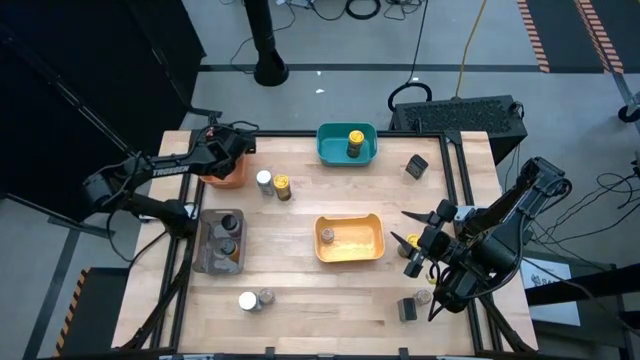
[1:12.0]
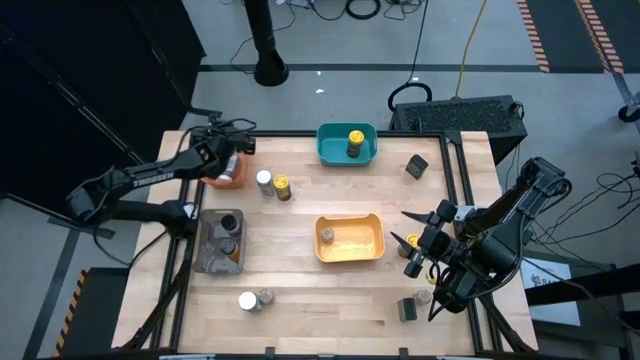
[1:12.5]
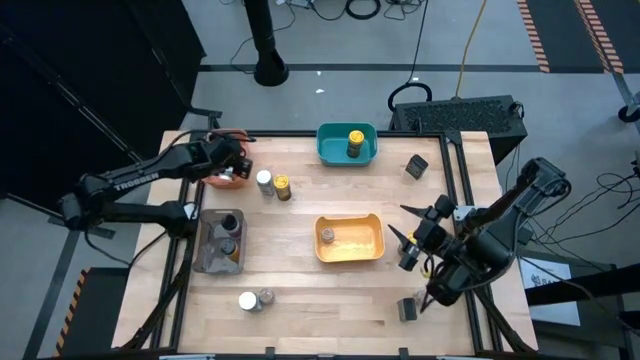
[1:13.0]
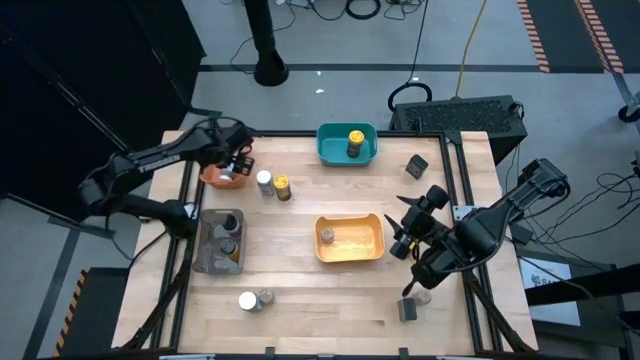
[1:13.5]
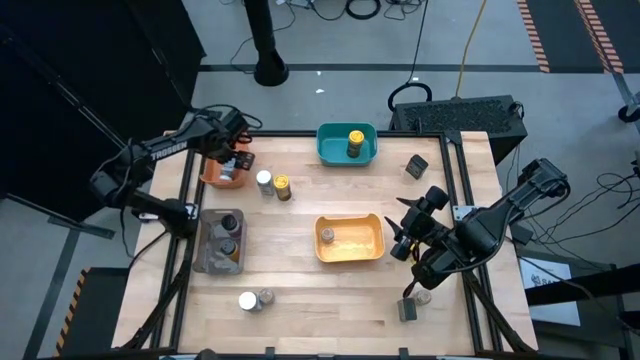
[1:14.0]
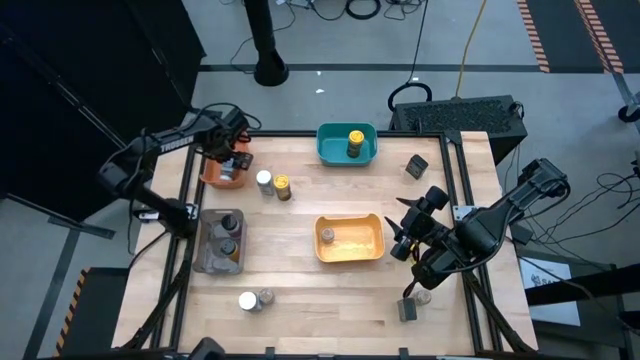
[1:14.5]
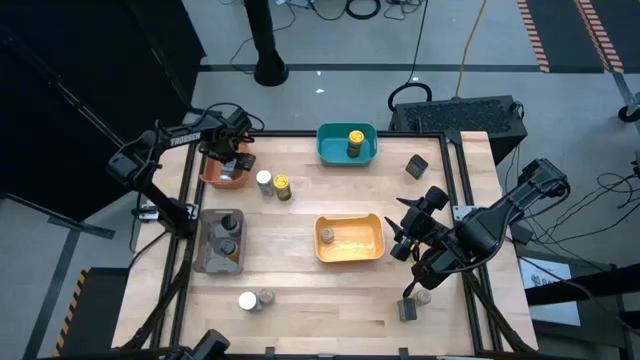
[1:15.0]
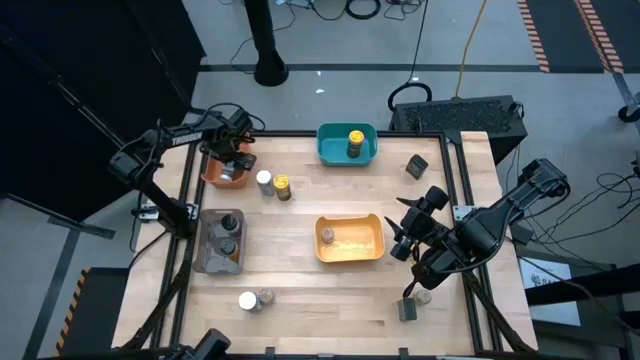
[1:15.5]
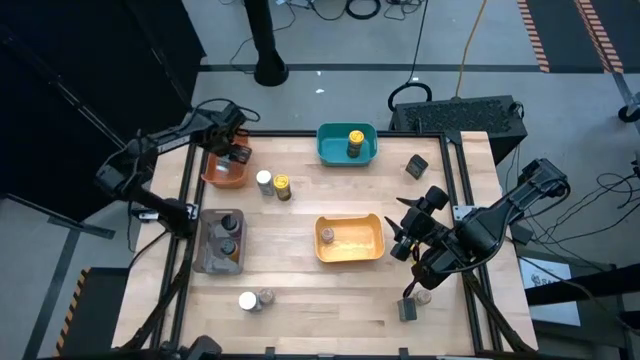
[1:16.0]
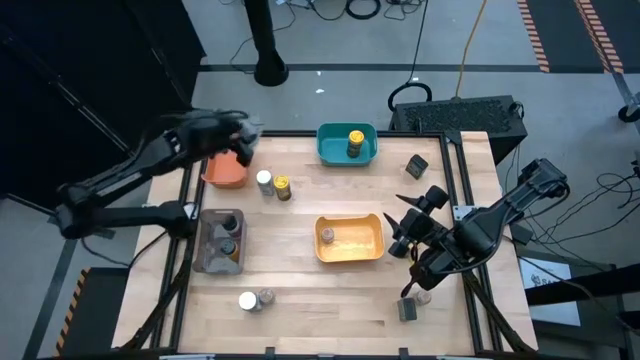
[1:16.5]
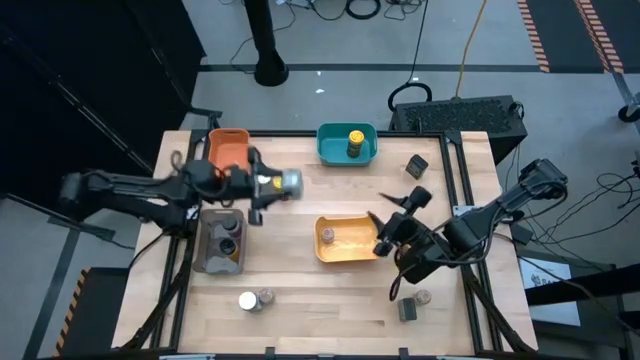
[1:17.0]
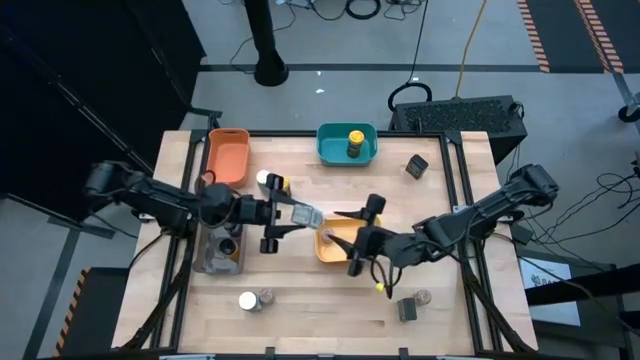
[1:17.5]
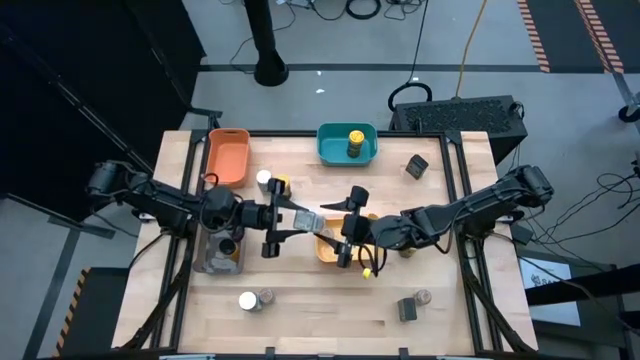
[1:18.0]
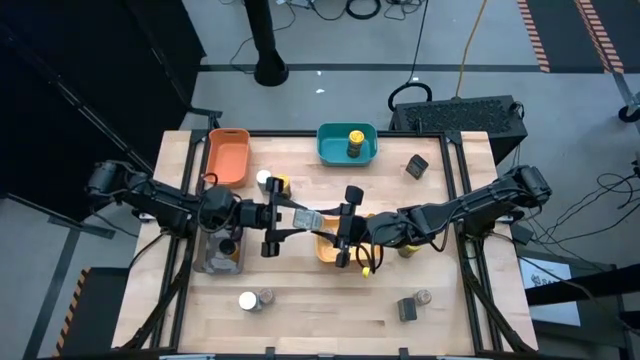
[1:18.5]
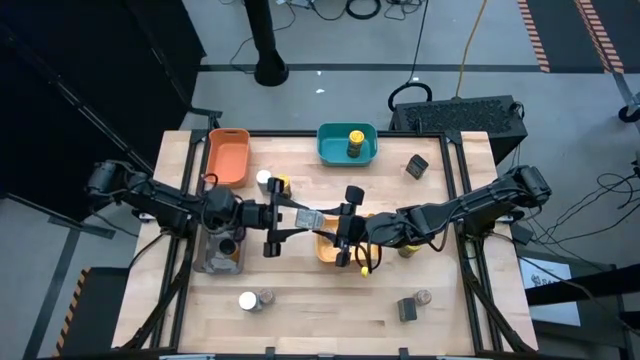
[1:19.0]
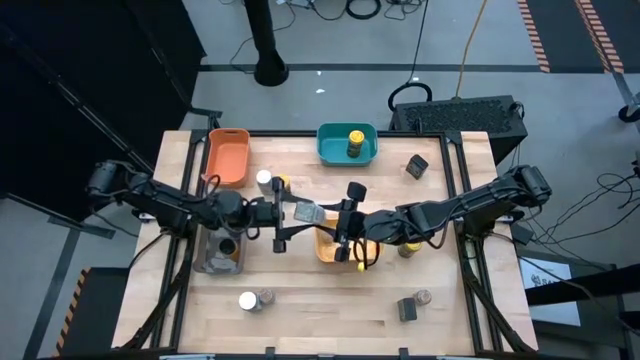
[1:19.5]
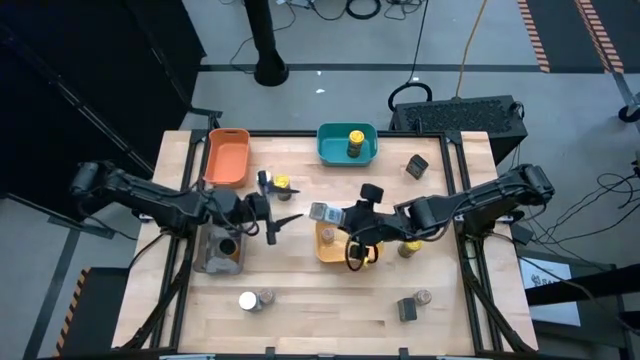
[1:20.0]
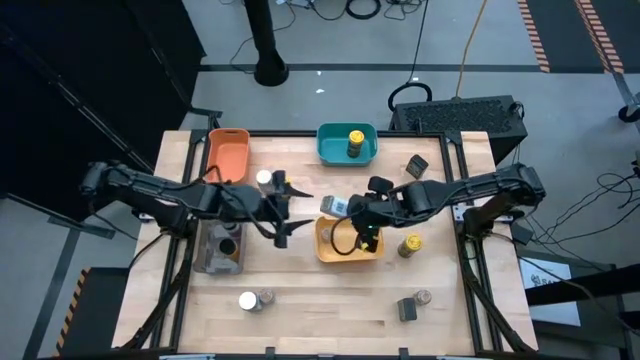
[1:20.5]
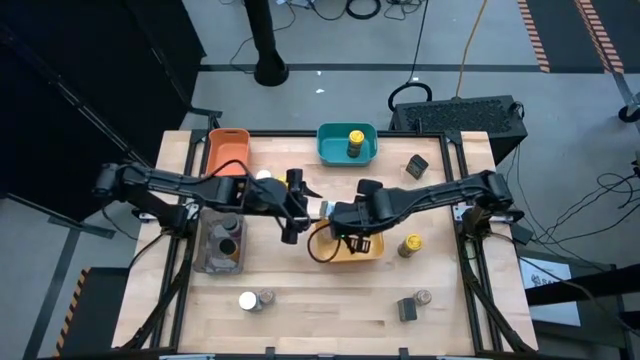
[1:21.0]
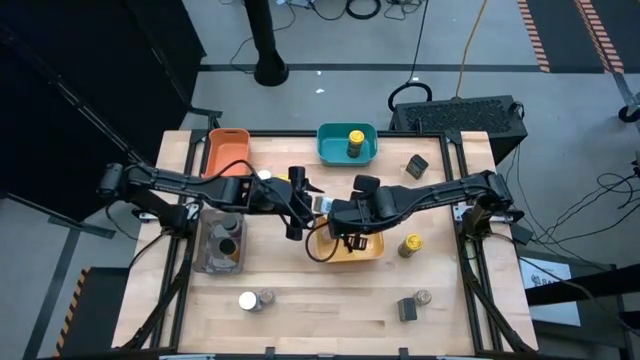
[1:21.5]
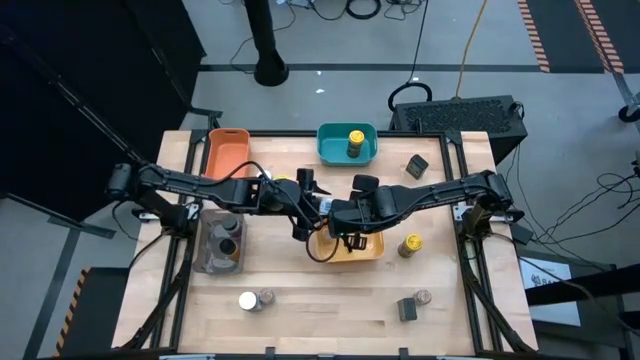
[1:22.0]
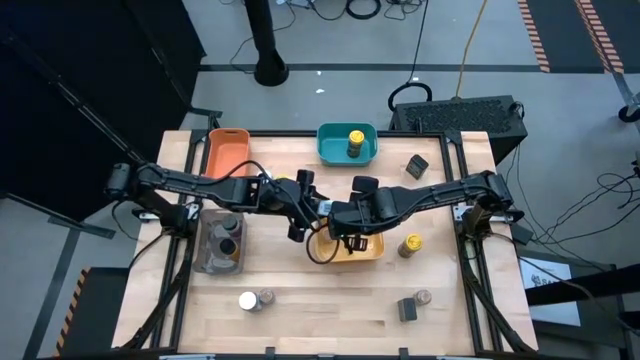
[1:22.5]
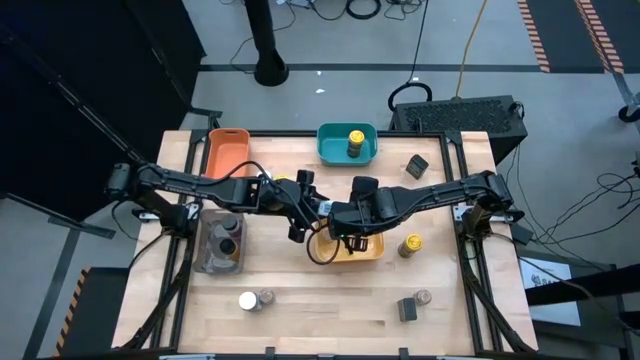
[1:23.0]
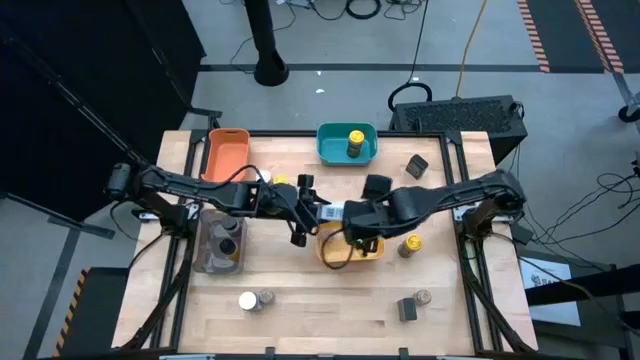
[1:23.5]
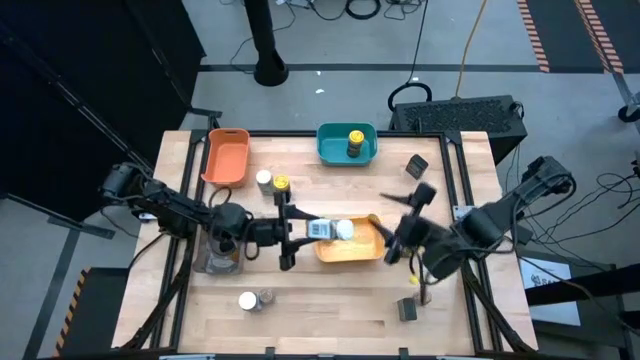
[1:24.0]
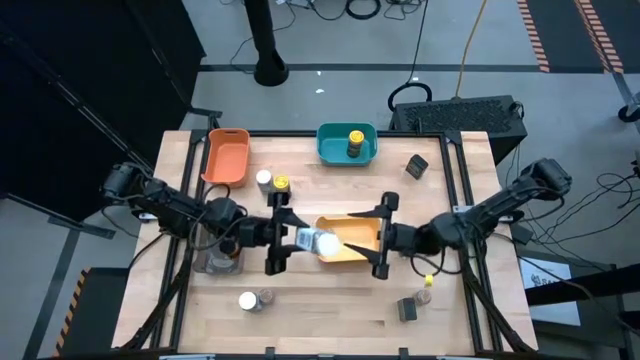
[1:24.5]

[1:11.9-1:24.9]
Task: Sort spices by type
Put the bottom right white spice bottle into the orange bin

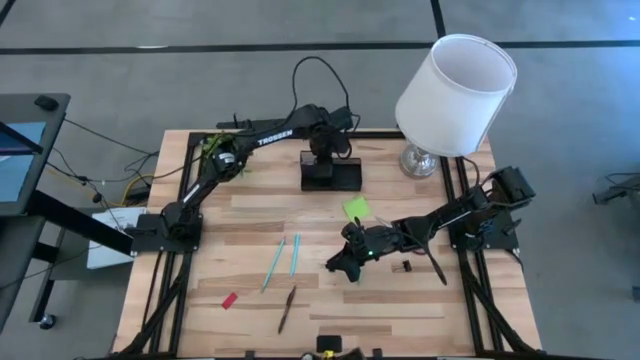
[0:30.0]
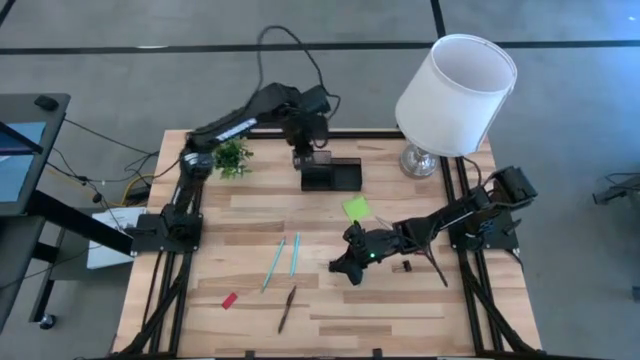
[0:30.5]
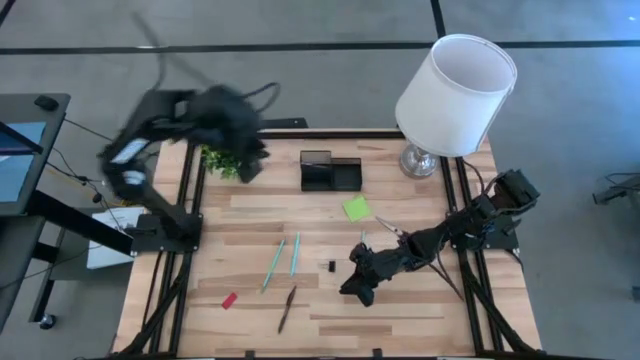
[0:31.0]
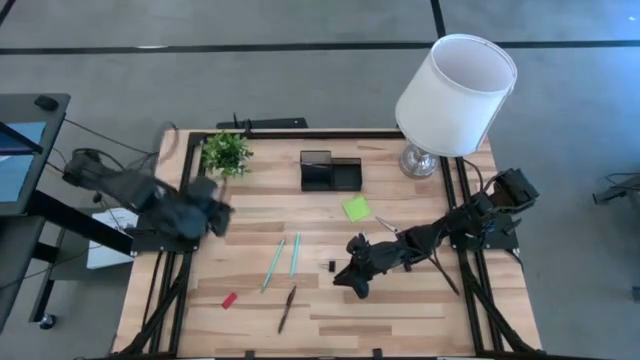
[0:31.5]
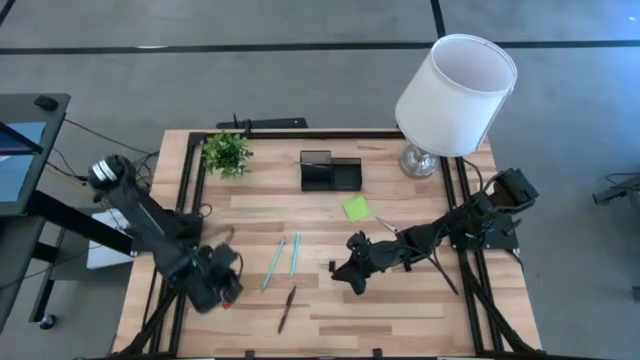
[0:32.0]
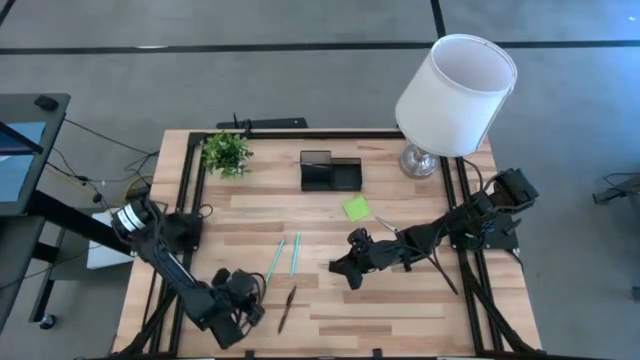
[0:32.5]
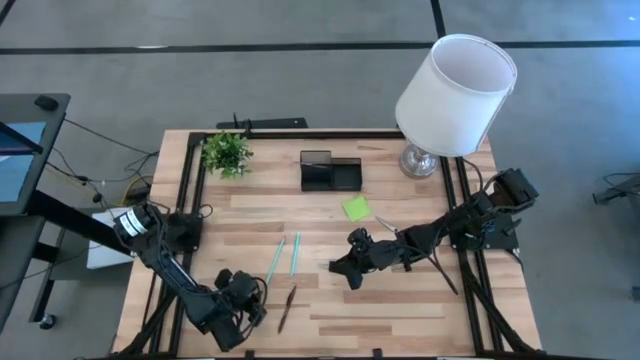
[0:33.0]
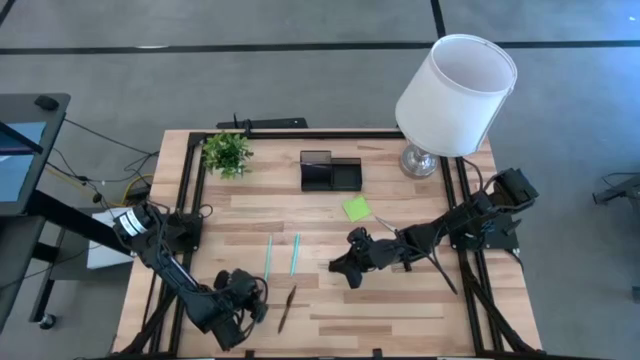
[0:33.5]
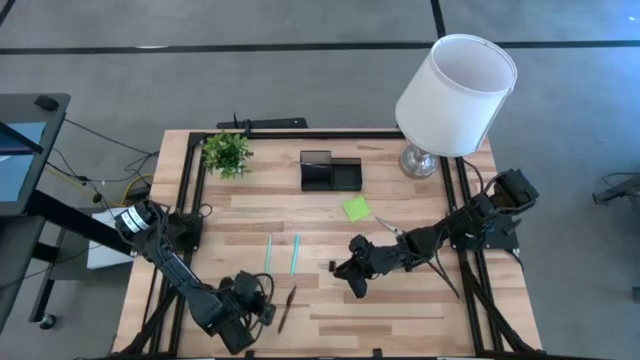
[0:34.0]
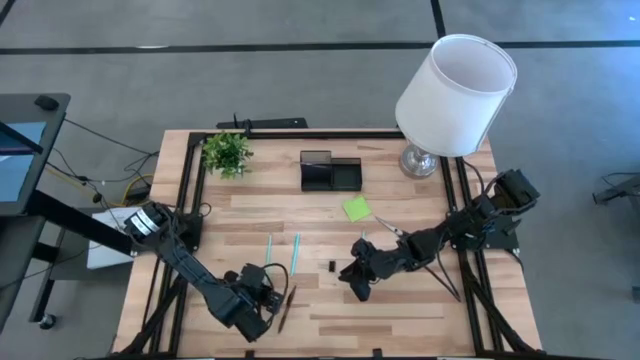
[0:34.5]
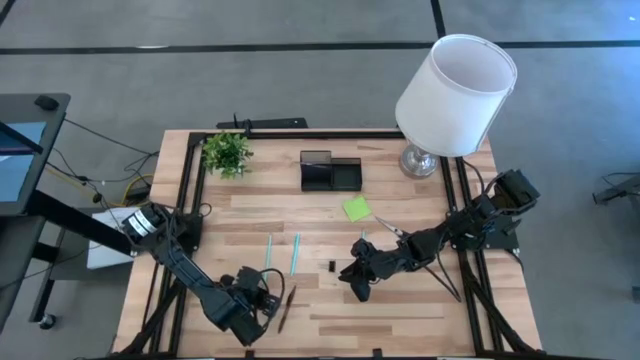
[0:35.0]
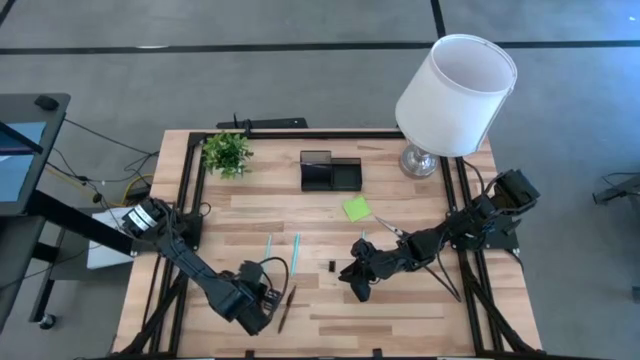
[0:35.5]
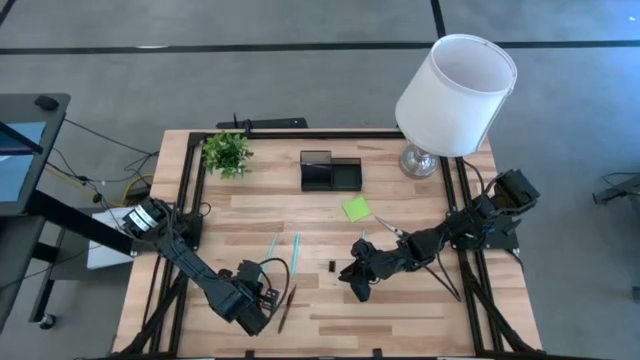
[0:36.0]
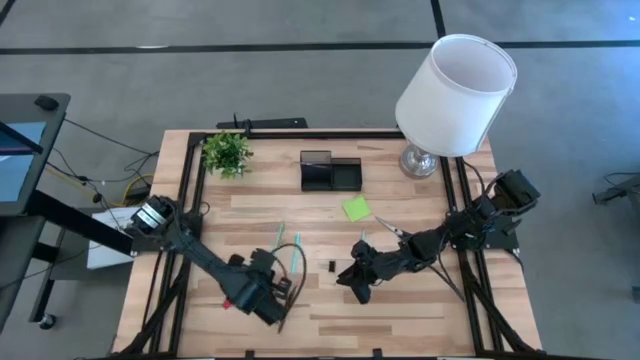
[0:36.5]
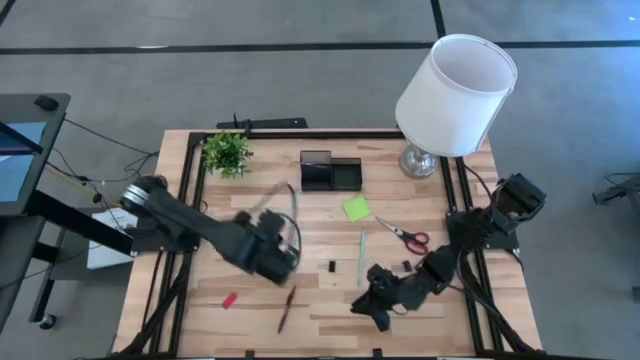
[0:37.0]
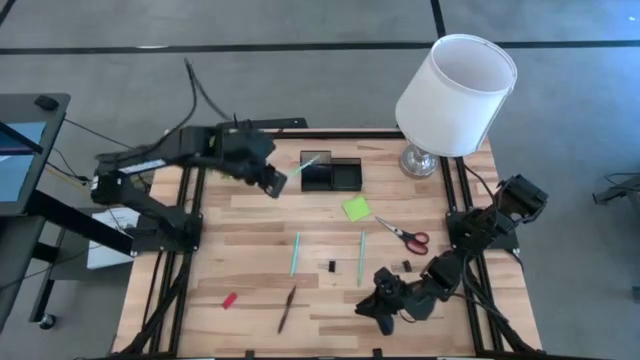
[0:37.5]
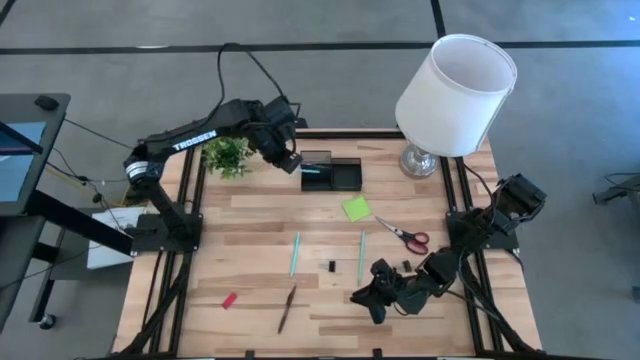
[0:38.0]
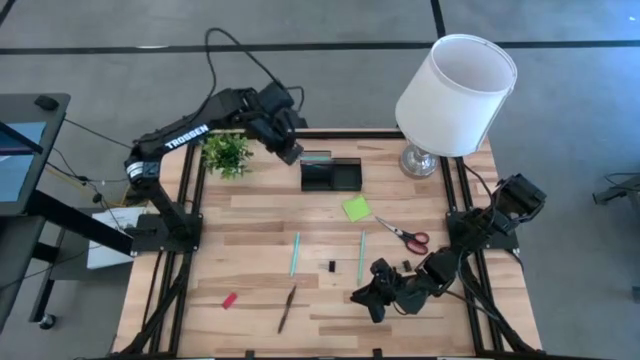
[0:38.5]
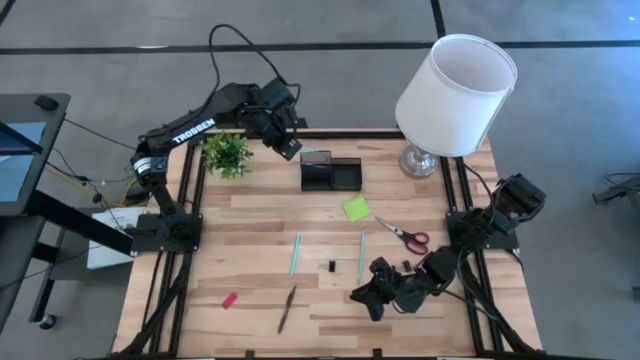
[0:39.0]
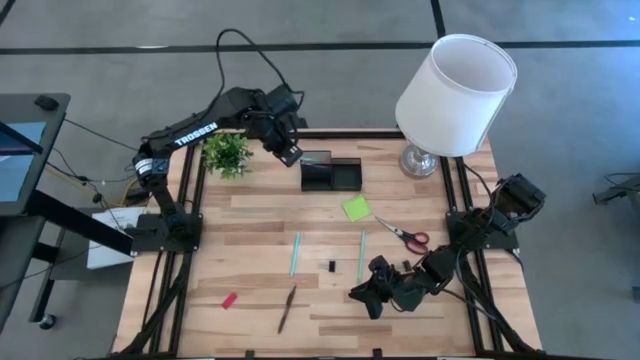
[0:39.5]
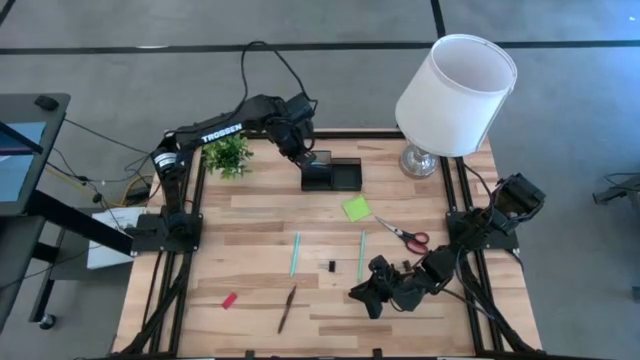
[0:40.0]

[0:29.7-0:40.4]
Task: Pick and place office supplies into organizer
Put the left blue pencil into the black desk organizer
